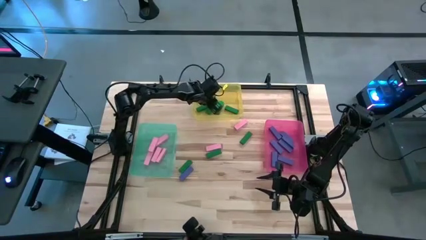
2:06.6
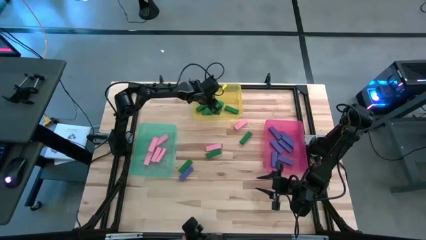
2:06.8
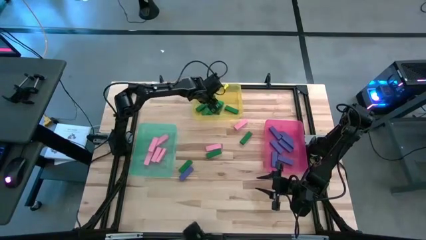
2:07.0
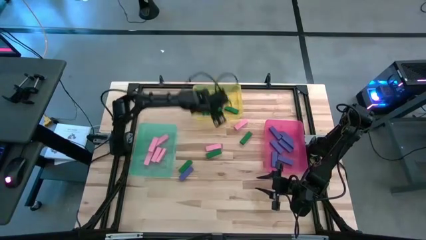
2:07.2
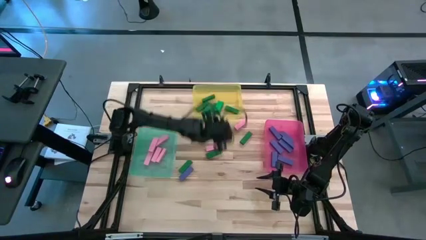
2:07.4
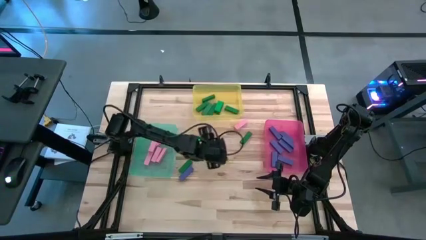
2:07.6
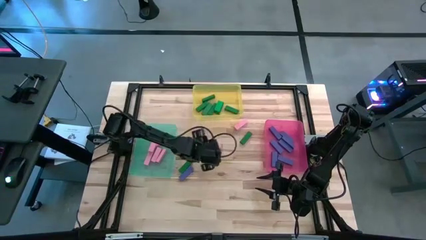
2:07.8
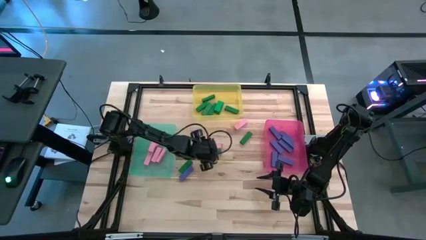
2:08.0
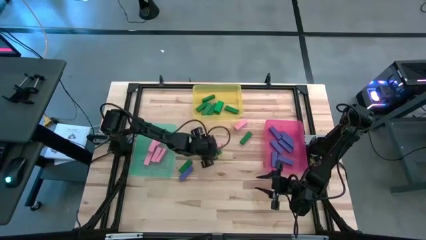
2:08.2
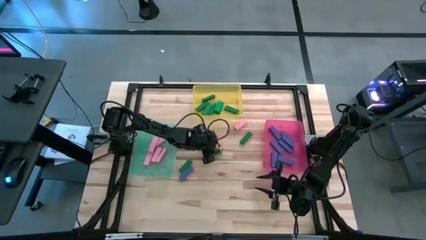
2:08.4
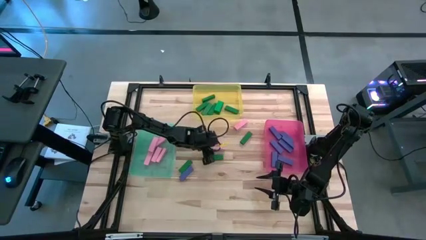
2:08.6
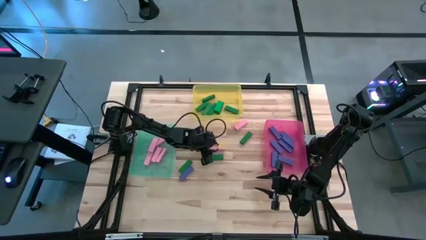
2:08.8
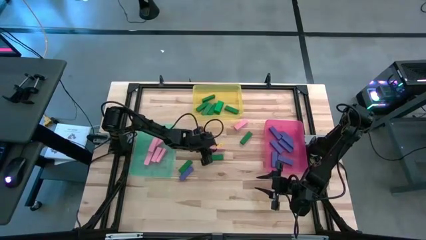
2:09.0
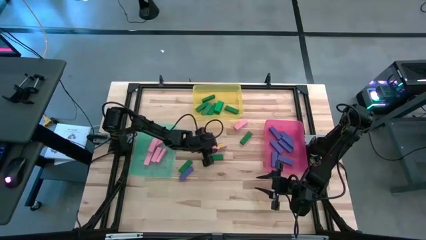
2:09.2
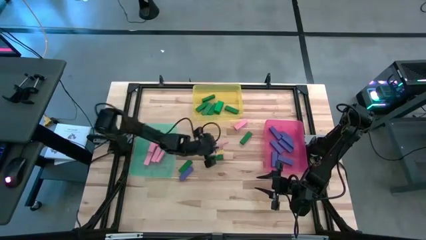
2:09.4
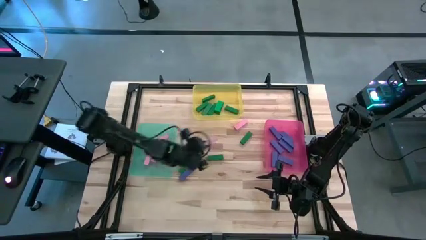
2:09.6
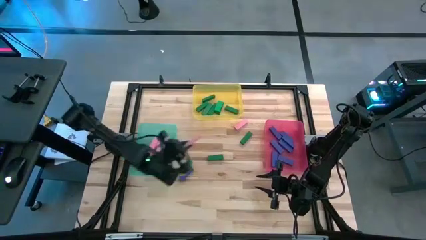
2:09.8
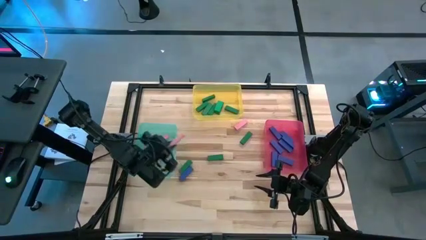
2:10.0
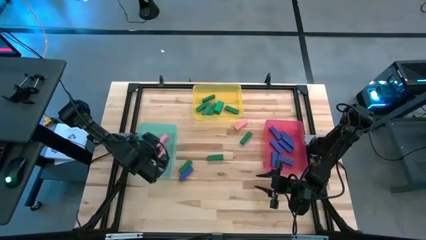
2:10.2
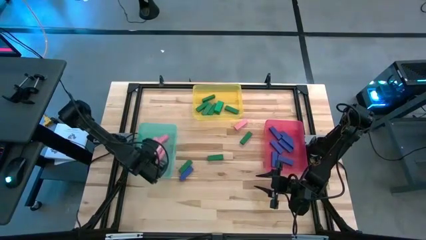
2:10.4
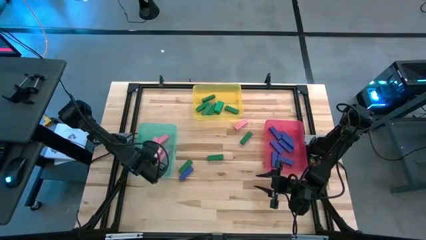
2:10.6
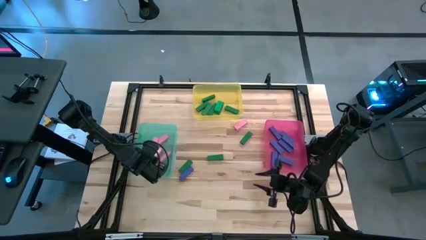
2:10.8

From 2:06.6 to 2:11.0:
Task: Sort blocks
Put the pink block into the blue bin

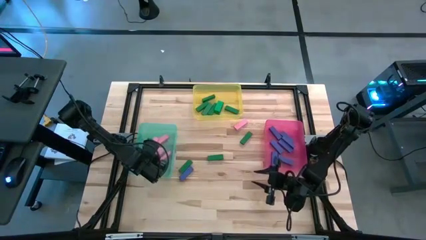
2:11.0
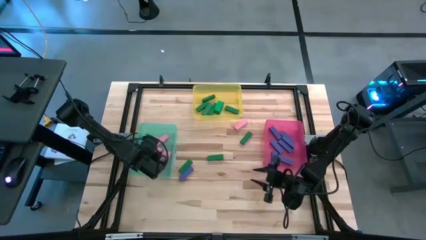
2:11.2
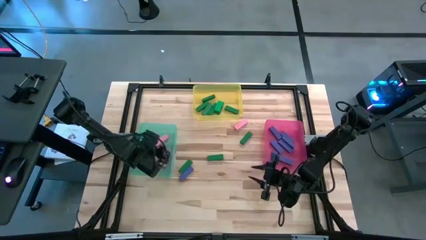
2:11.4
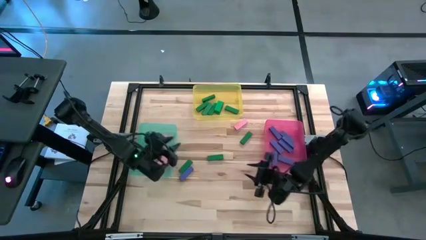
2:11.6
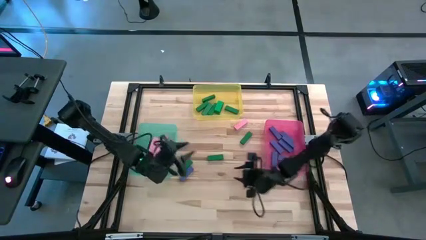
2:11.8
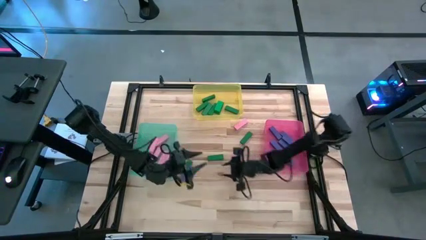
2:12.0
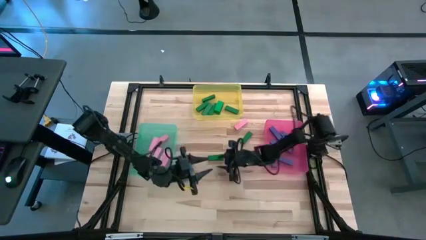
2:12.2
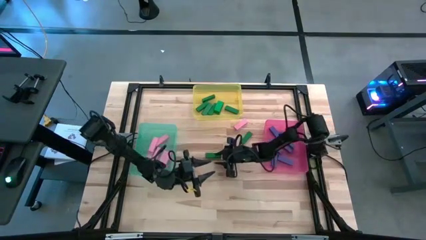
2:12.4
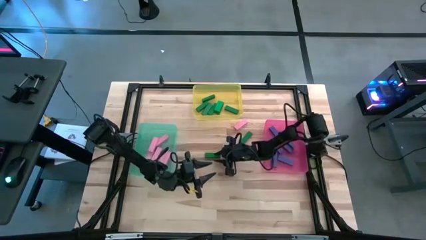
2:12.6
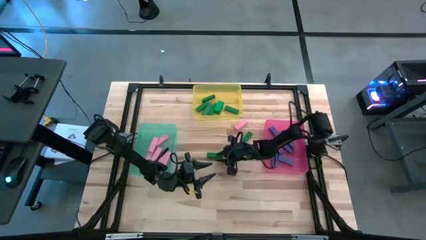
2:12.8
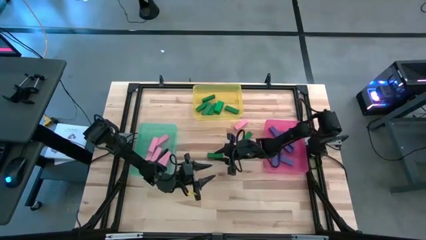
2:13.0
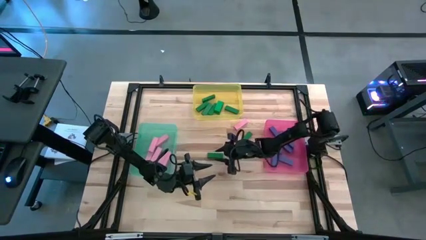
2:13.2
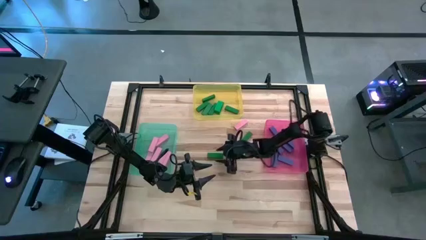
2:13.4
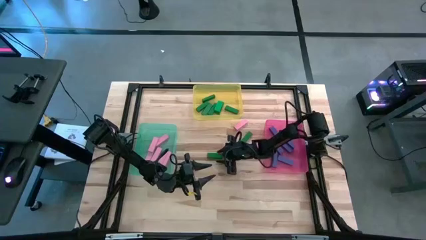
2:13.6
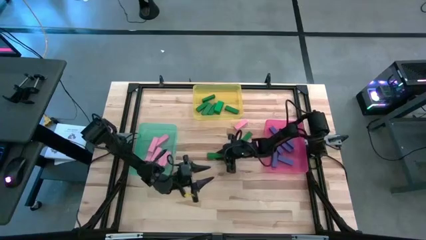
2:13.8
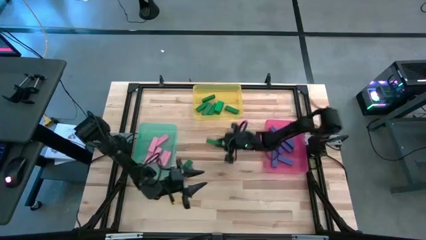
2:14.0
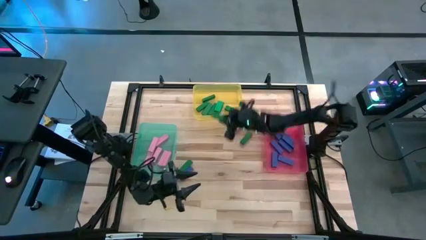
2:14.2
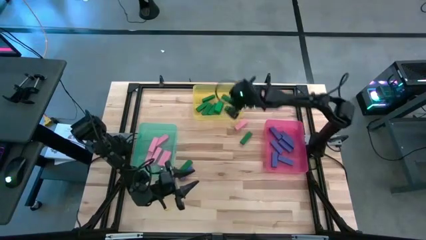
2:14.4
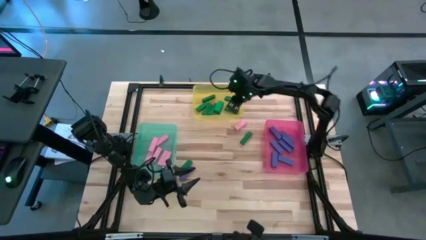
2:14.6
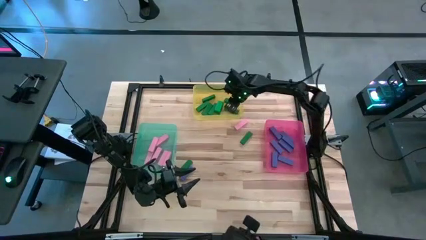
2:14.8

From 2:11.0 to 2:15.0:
Put the green block into the yellow bin

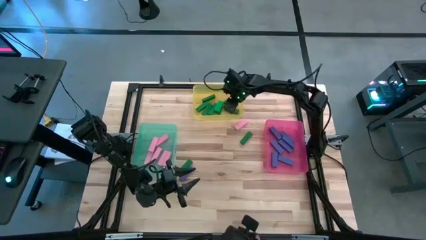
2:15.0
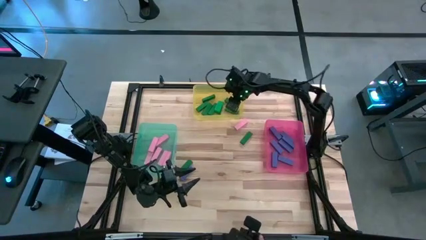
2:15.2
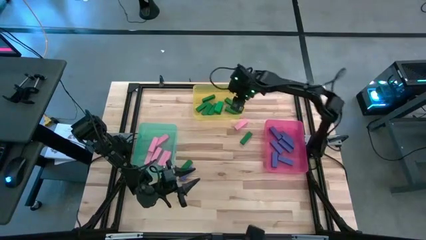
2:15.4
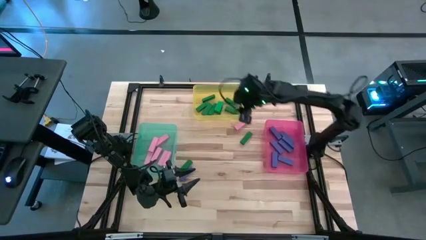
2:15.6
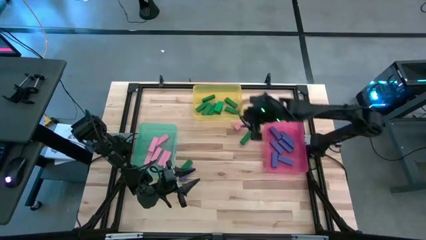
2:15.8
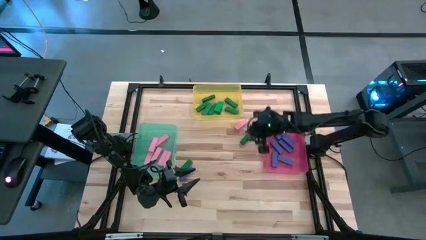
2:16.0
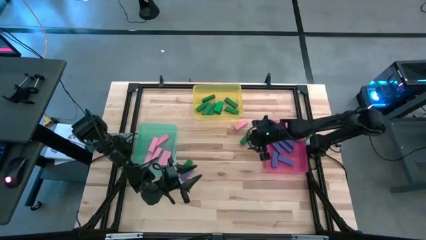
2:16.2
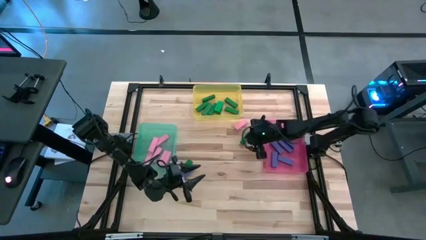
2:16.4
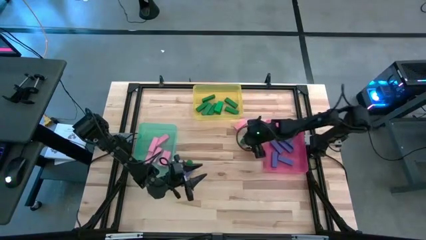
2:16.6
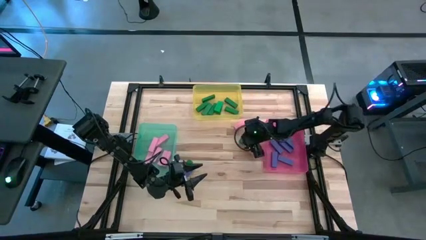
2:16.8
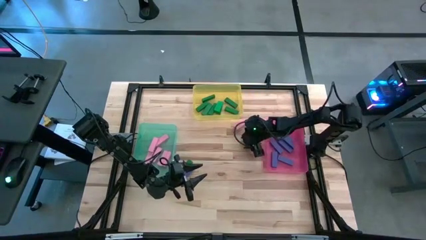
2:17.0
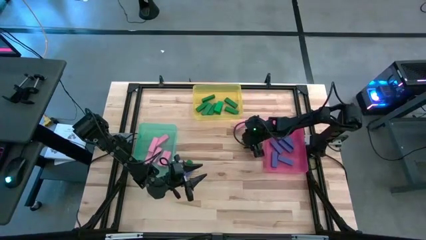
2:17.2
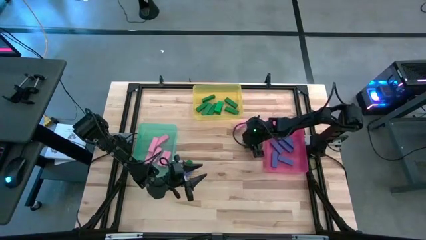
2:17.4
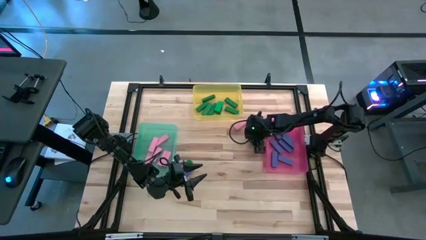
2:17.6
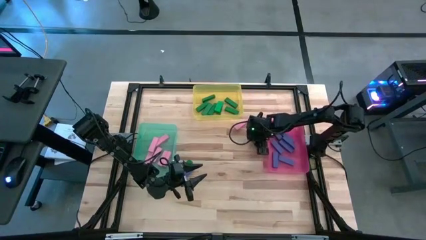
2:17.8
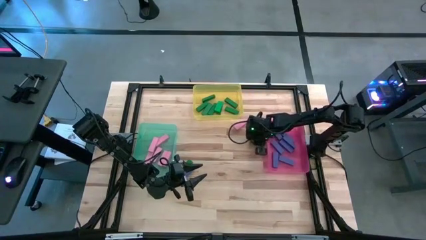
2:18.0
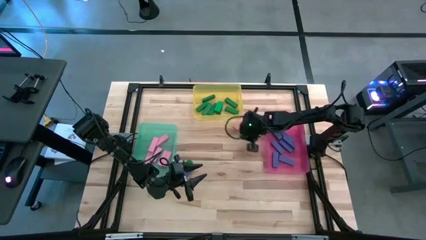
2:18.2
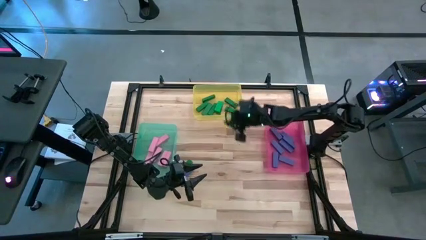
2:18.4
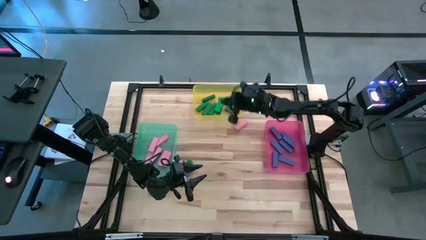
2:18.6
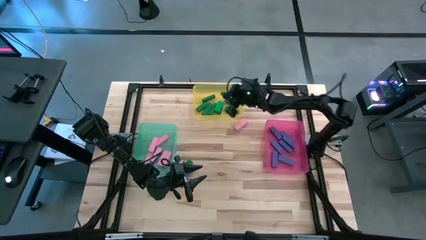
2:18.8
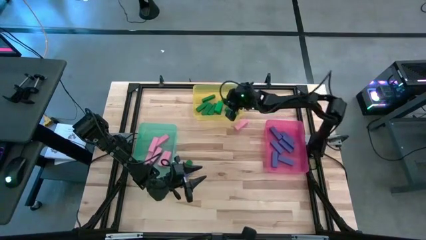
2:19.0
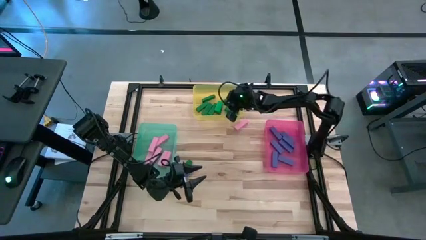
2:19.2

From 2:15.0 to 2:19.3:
Put the green block into the yellow bin

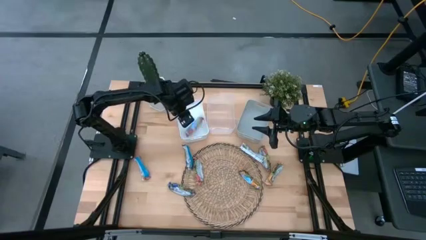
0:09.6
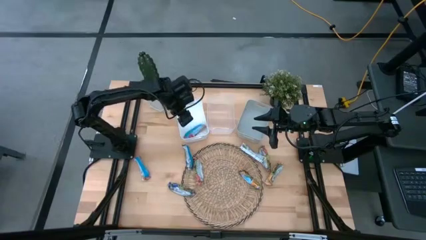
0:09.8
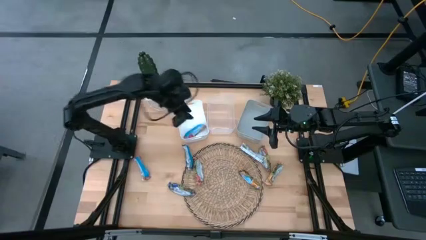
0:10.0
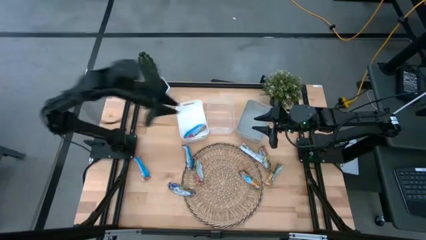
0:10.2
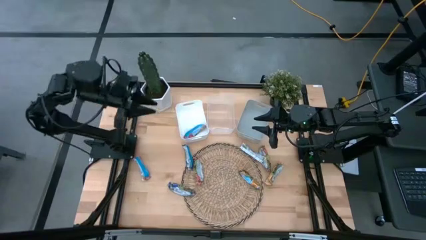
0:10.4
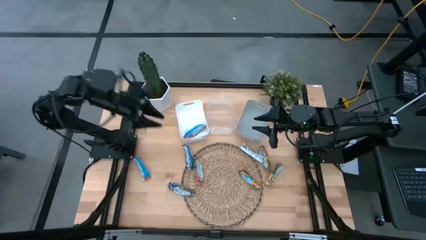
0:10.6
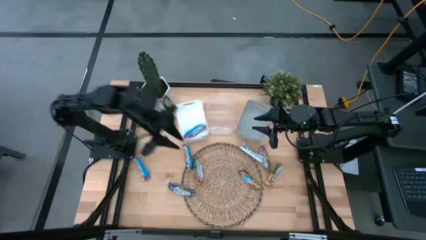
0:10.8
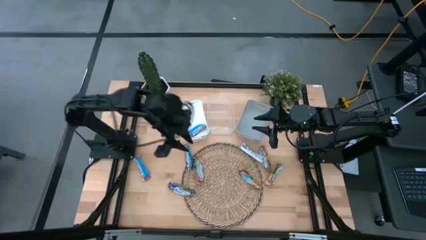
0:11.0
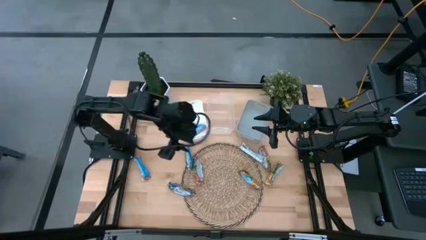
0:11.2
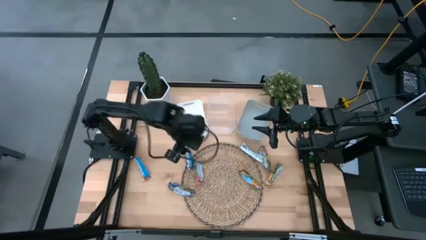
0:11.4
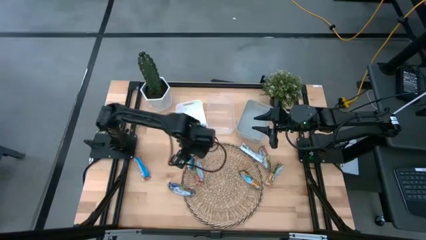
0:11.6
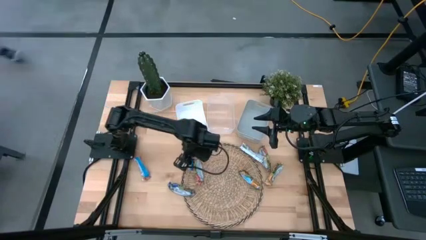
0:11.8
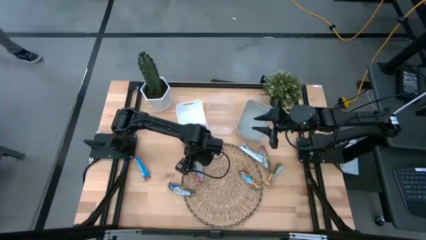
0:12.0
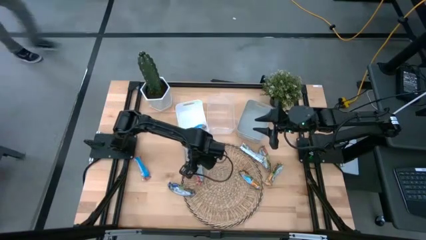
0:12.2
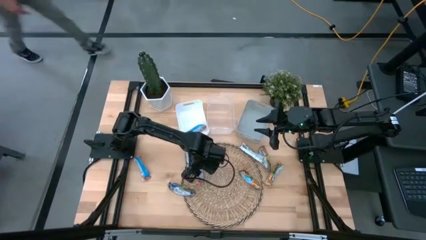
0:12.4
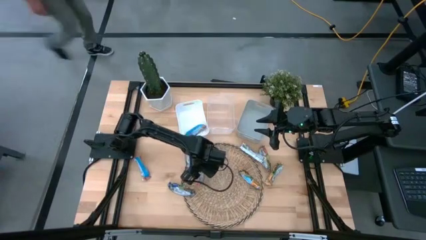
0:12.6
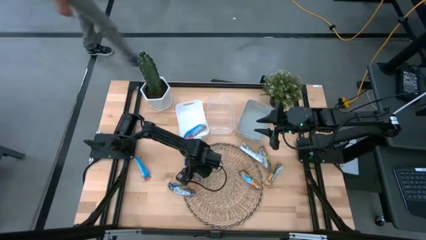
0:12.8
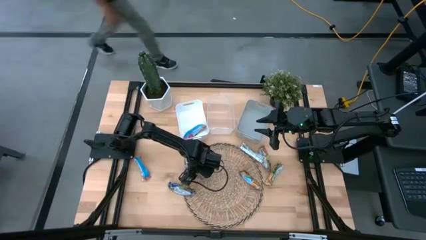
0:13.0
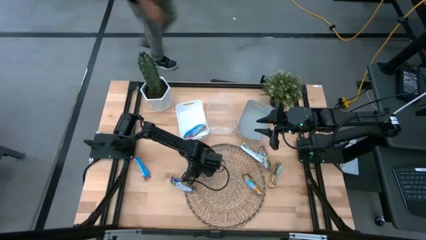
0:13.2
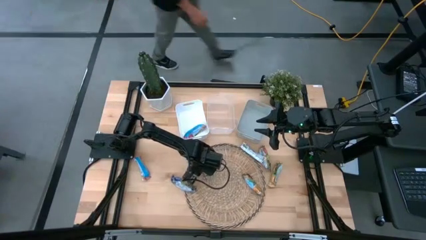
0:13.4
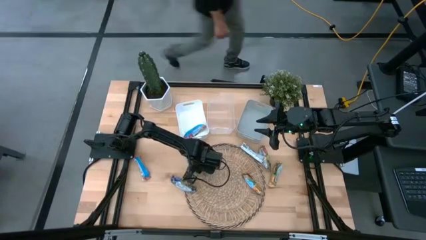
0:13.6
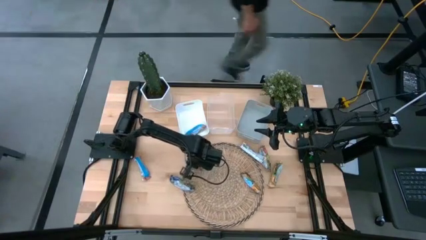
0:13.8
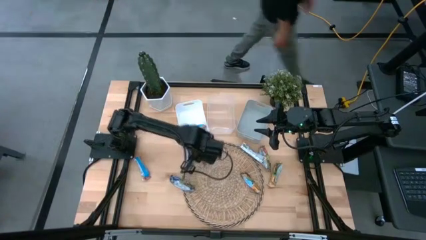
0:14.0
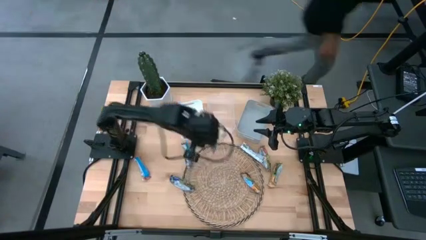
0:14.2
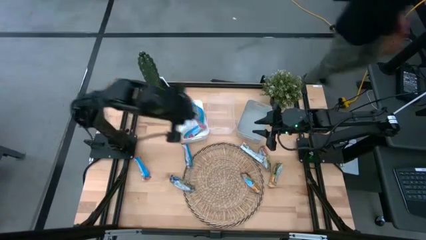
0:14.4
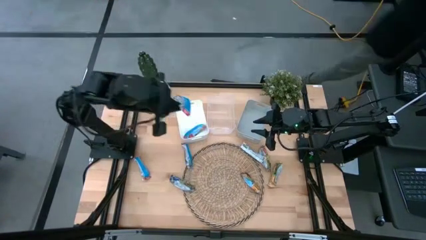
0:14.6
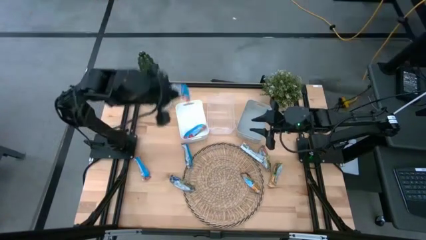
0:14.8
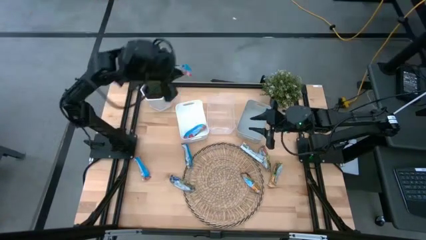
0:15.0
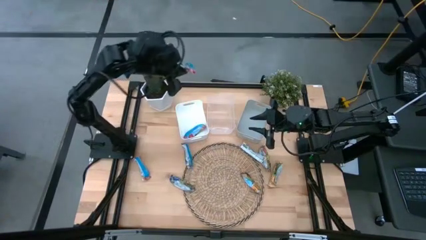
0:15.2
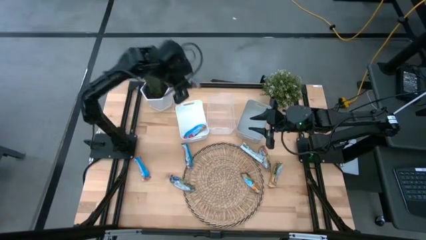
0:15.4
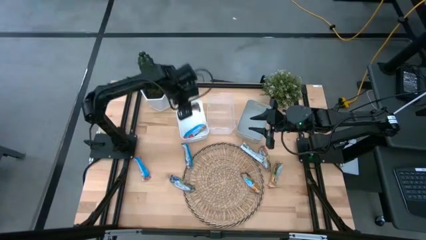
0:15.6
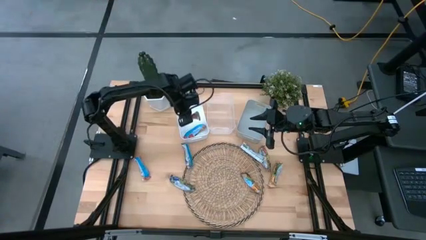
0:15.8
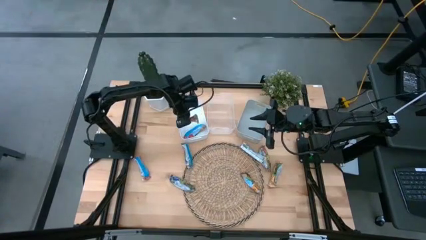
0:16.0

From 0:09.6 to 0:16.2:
Task: Pick and place Granola Bars by type
Put the red granola bar into the white bin
